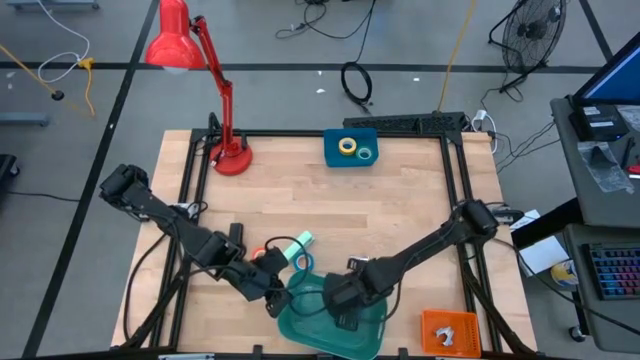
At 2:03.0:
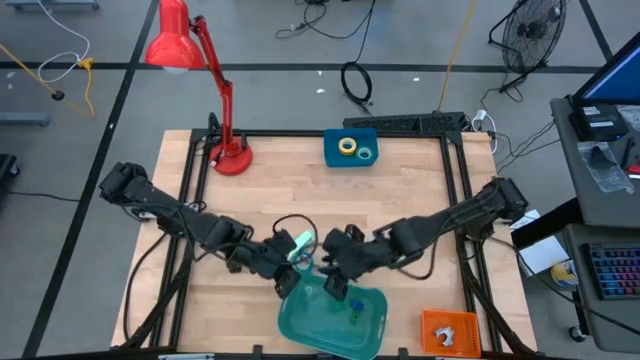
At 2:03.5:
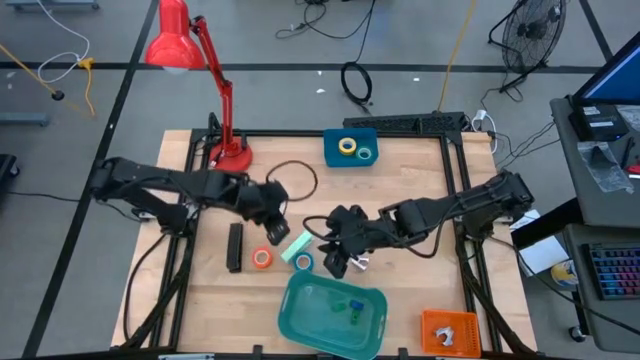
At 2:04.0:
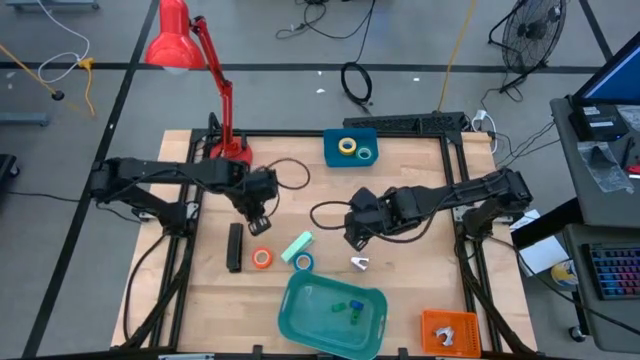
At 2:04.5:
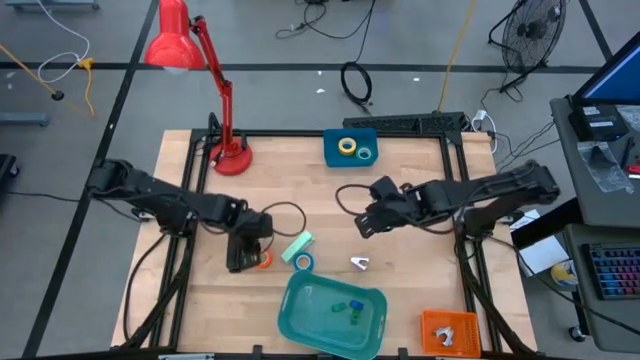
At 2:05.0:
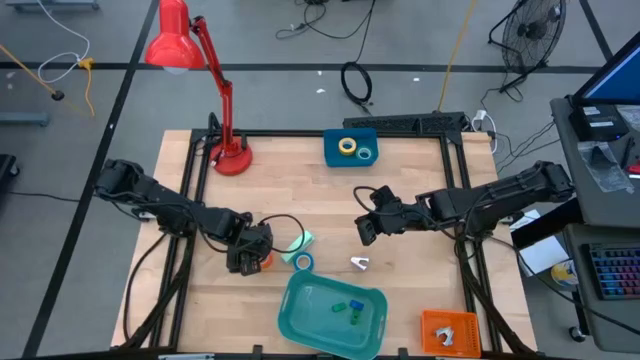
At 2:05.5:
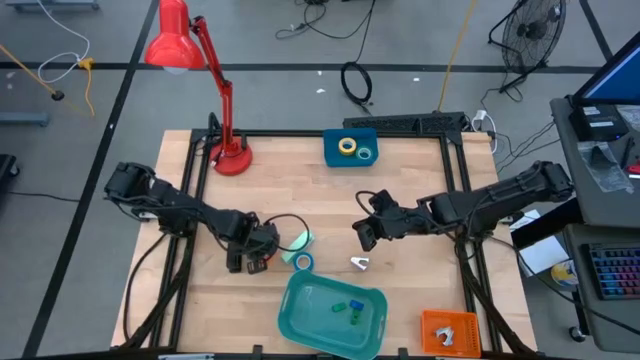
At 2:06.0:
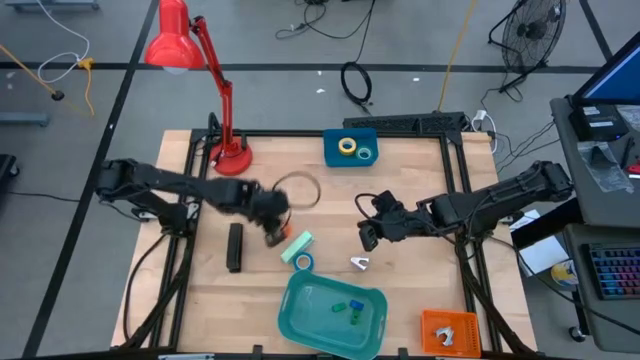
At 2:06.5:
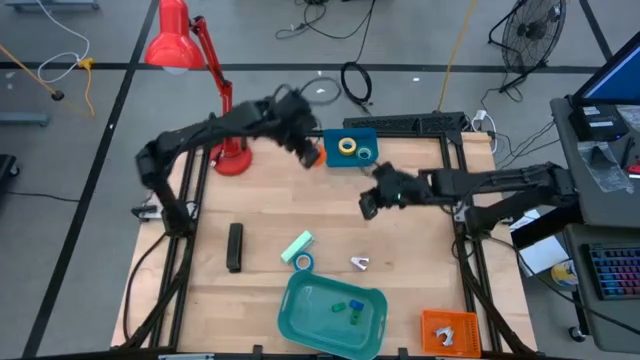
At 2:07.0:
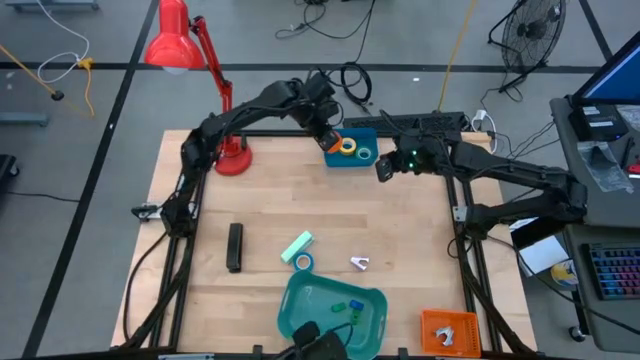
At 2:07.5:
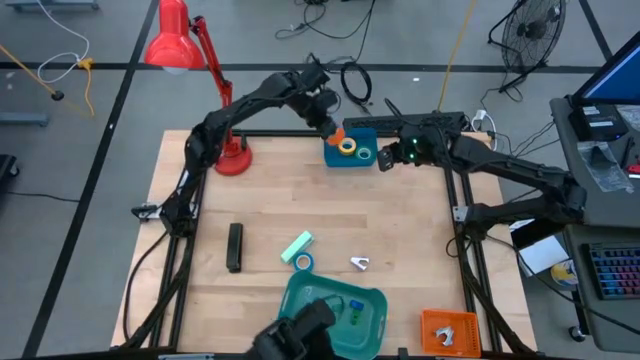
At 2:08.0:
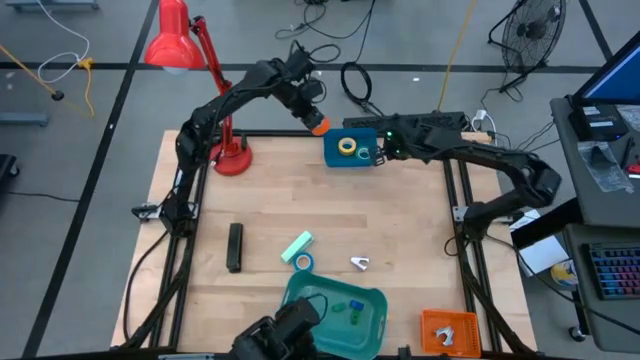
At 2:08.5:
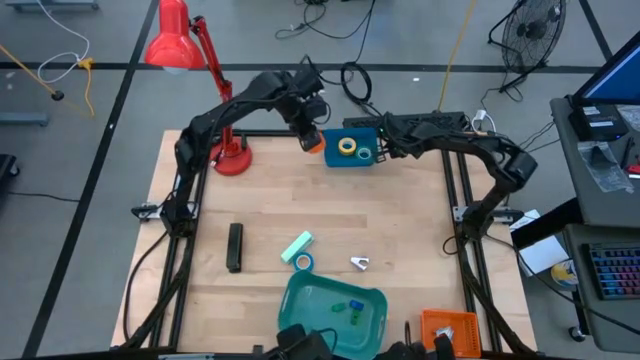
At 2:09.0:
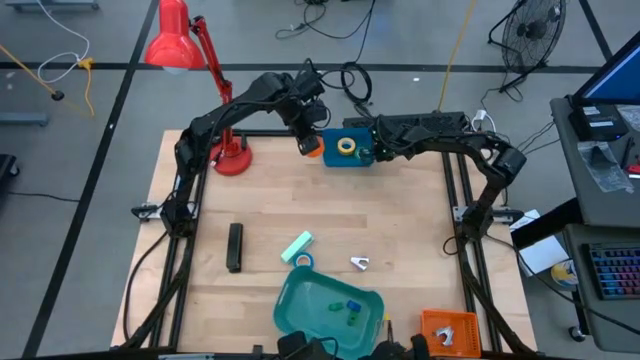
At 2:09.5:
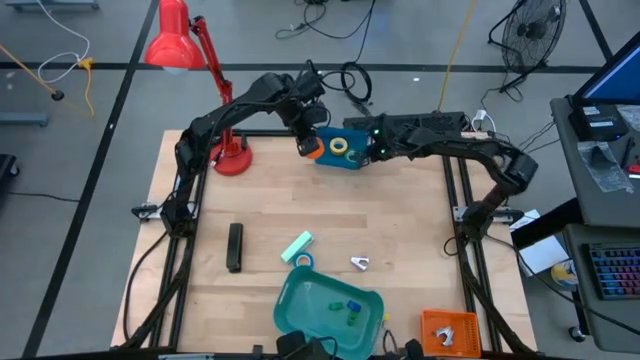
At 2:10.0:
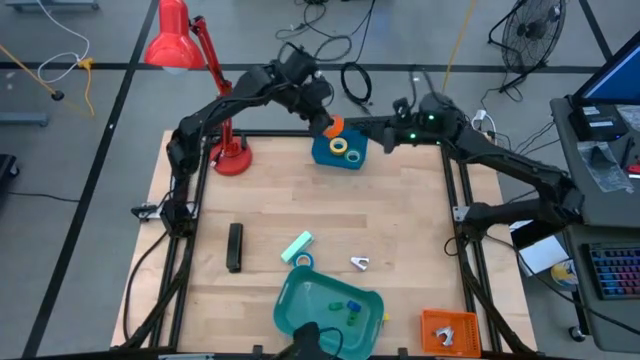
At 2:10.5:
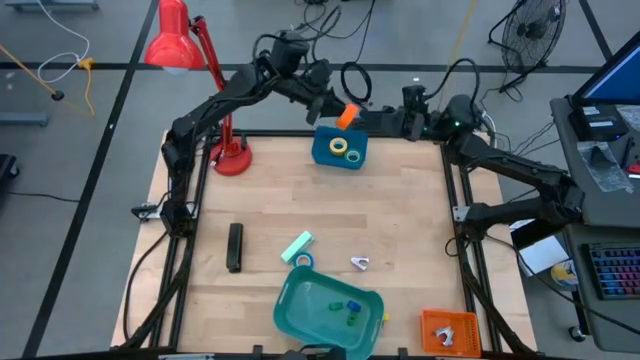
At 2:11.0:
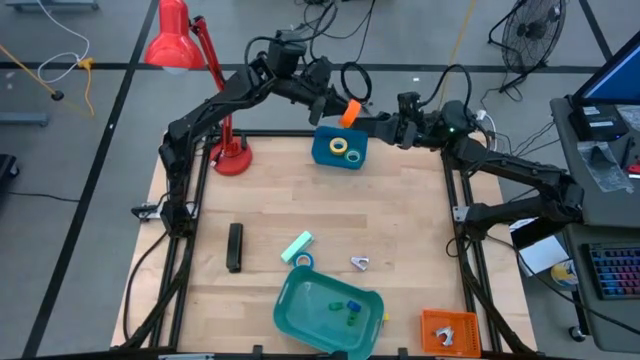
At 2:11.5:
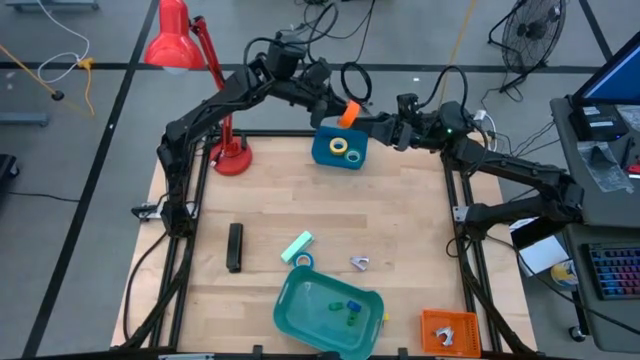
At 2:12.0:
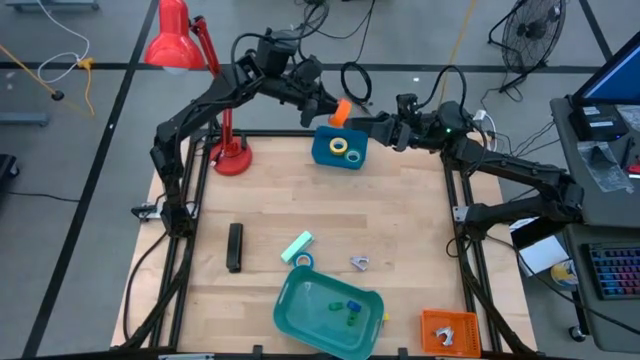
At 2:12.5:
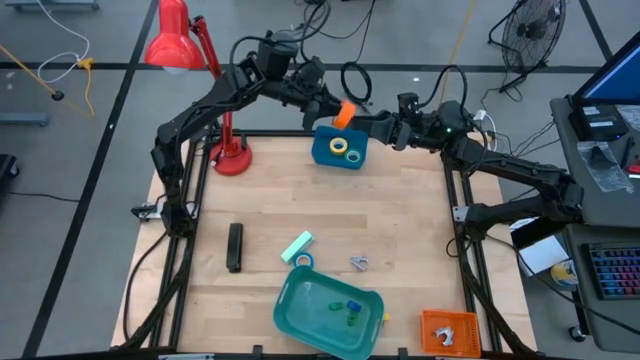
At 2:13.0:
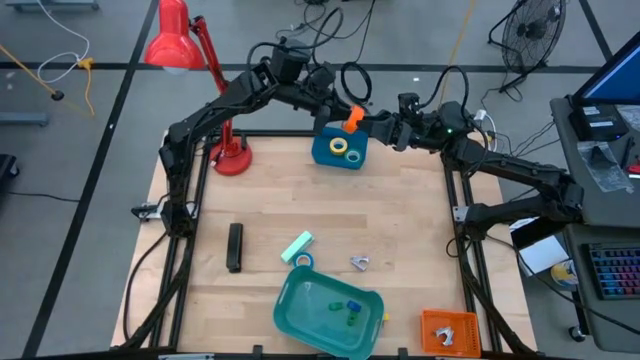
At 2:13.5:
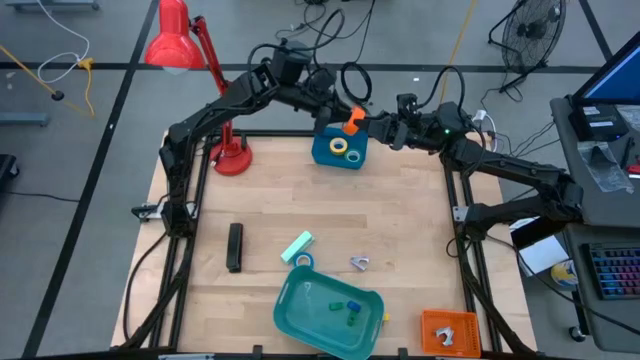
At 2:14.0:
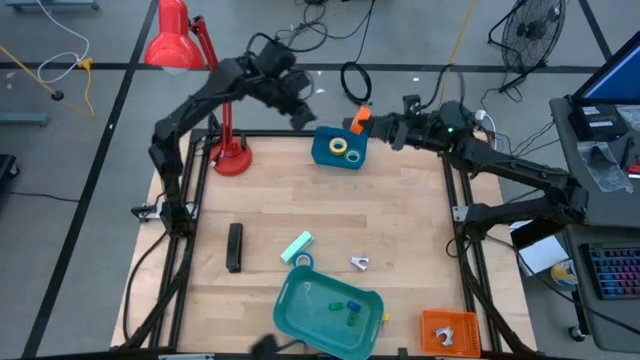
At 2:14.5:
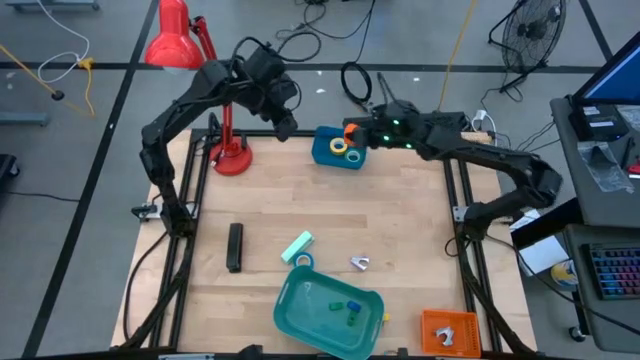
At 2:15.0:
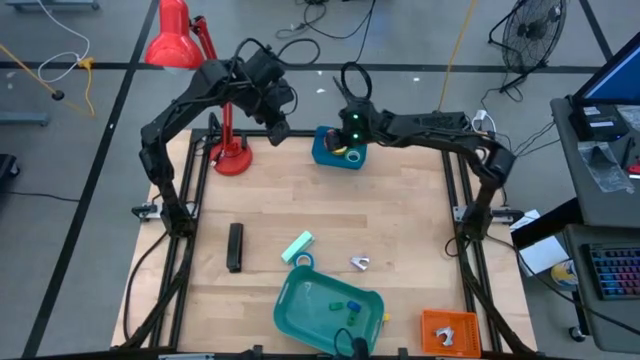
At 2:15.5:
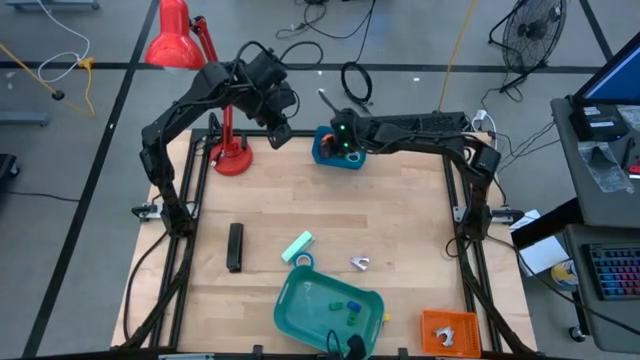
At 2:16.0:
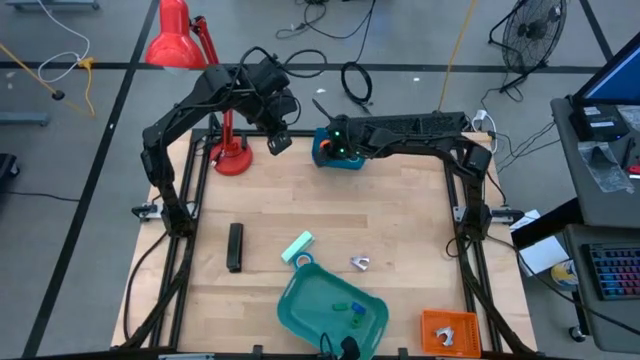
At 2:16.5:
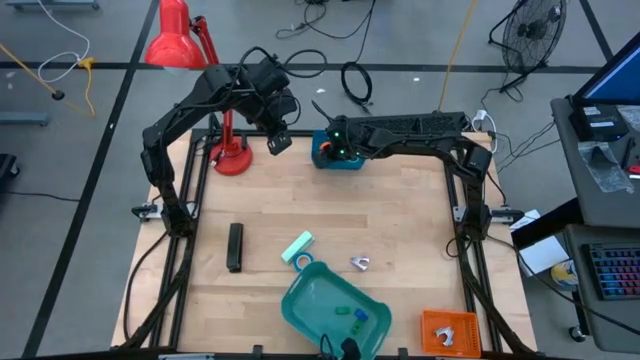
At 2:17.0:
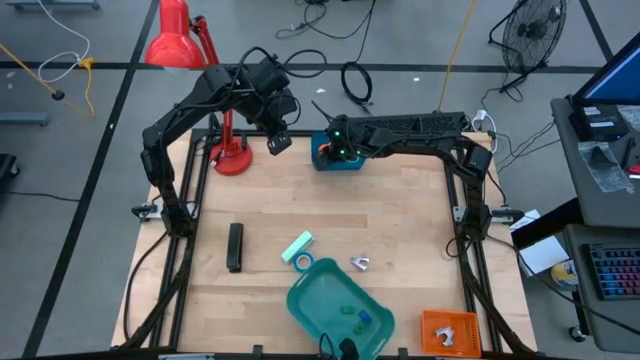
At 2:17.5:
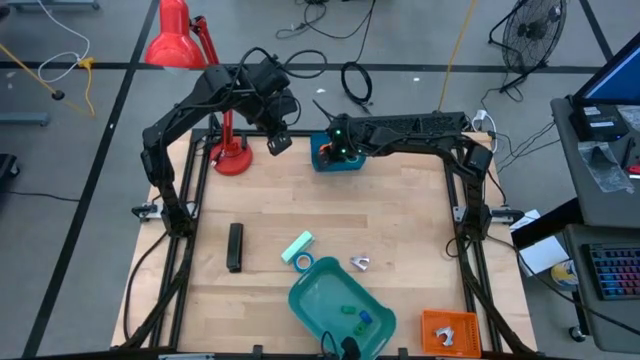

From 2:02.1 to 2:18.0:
Task: Pick and place Stapler, Stapler remover, tape
Put the orange tape into the blue bin

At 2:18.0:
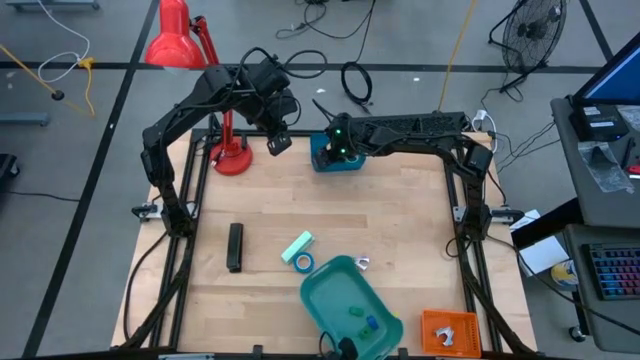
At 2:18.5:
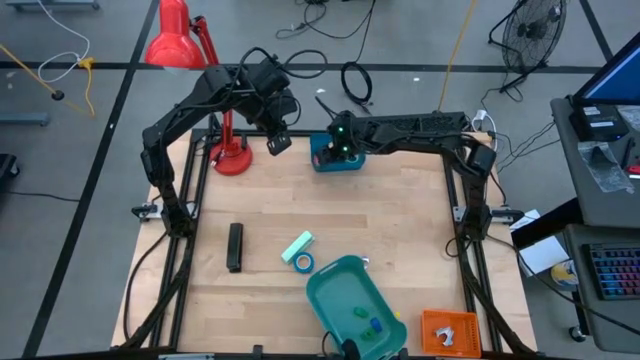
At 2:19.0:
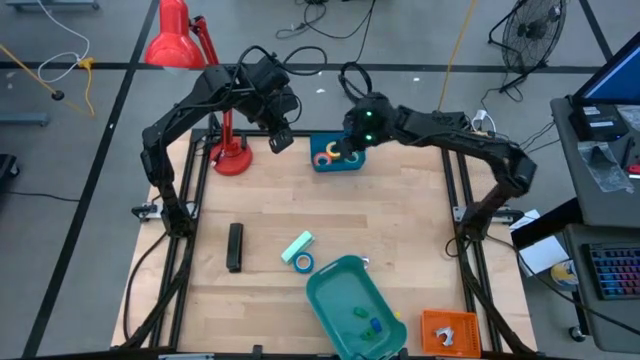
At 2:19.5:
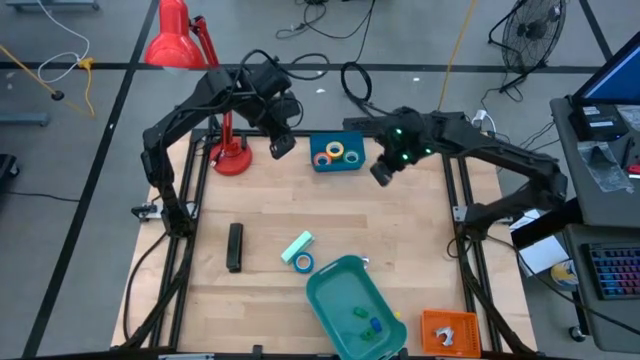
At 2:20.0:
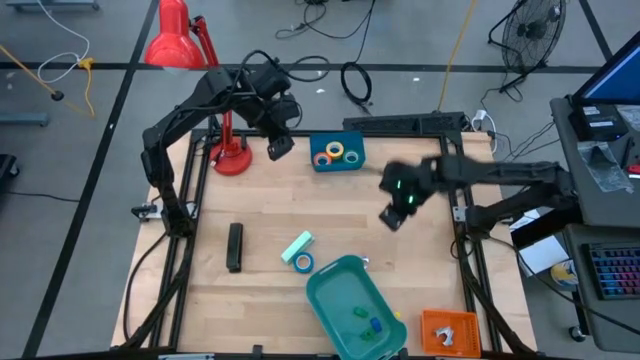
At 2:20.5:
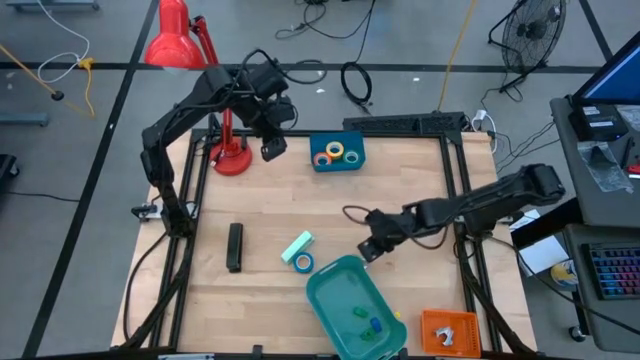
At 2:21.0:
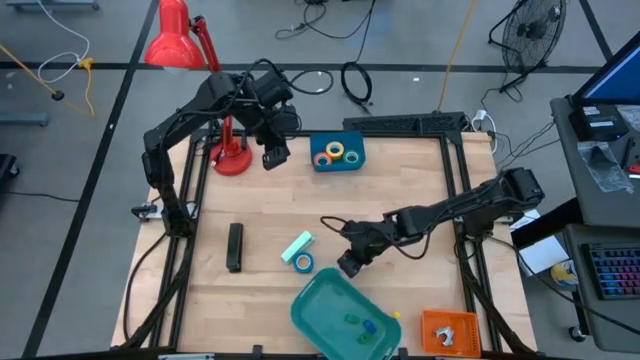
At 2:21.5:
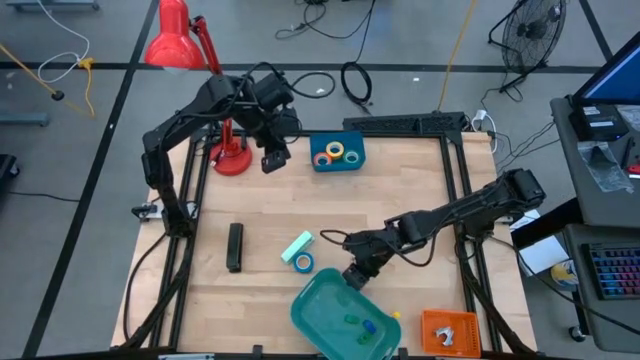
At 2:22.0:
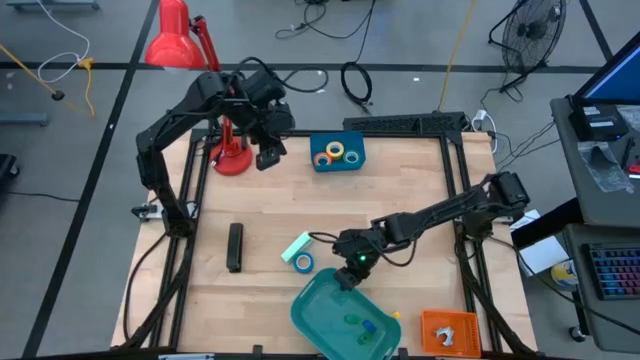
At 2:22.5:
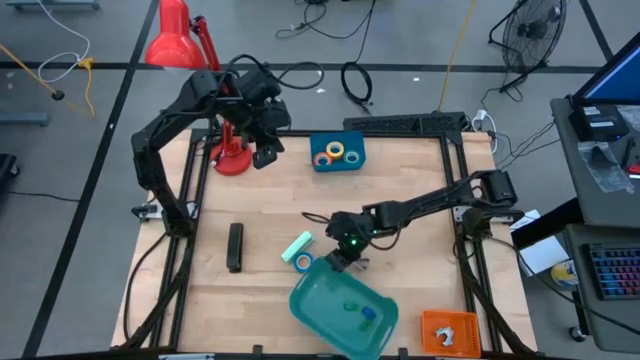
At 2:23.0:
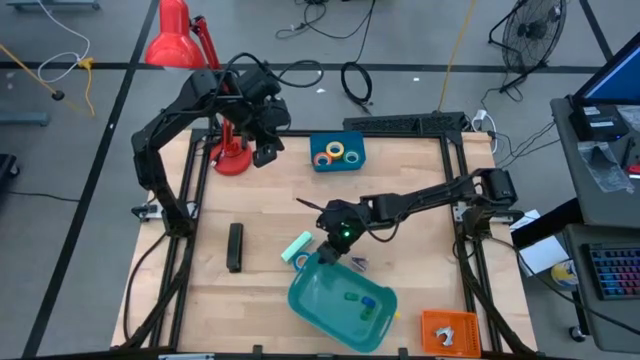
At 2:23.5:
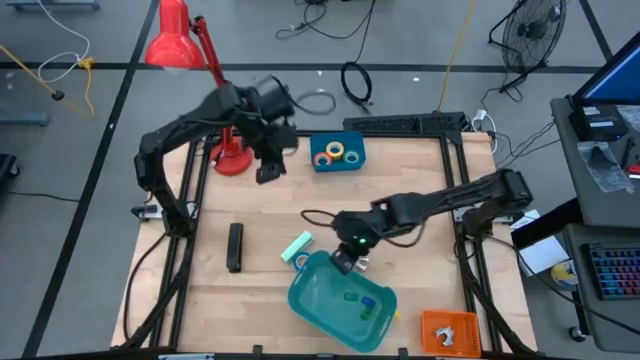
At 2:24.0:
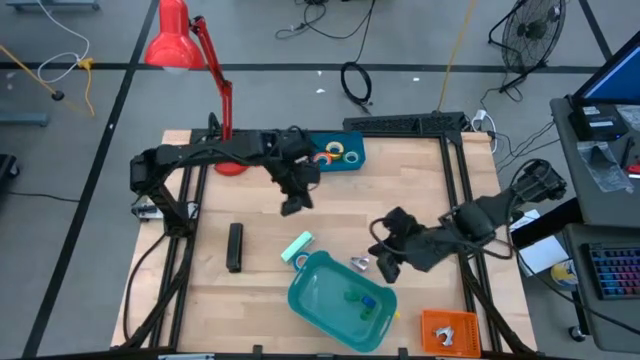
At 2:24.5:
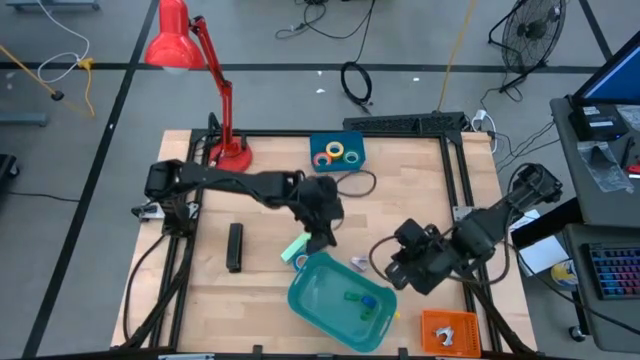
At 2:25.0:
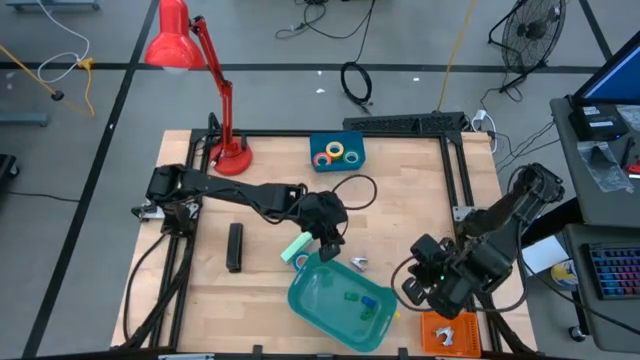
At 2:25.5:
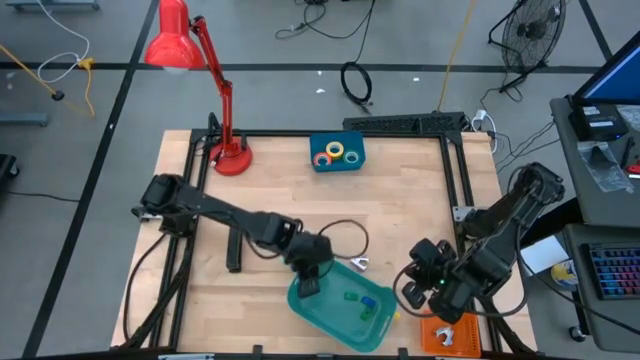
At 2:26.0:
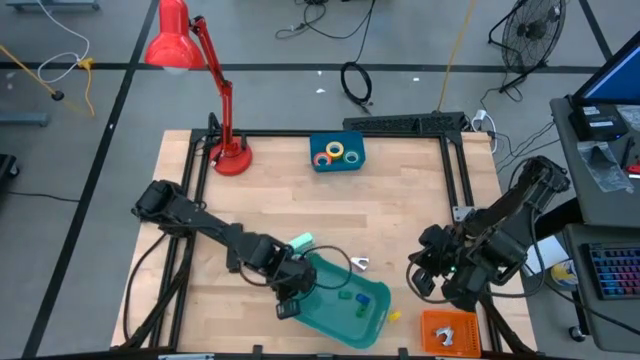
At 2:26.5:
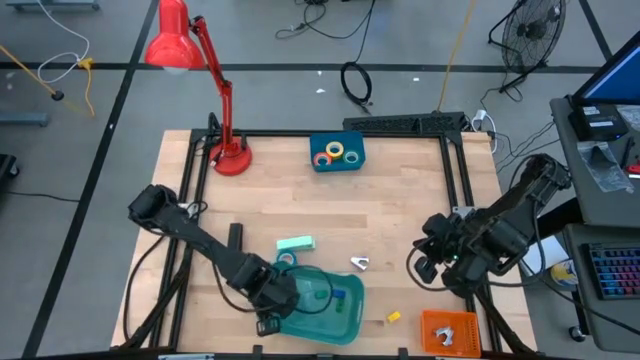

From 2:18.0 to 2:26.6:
Adjust the green bin
